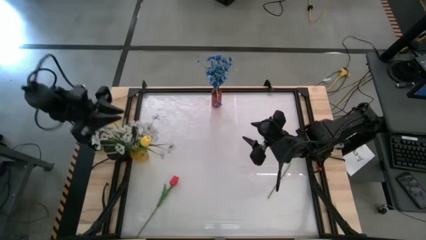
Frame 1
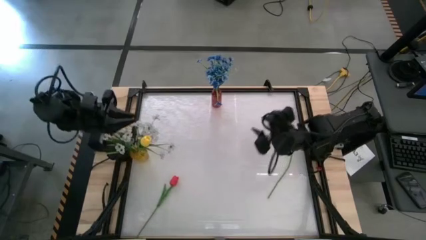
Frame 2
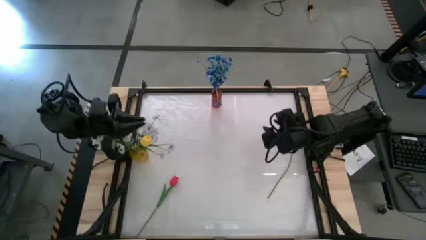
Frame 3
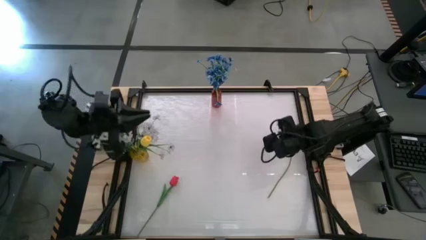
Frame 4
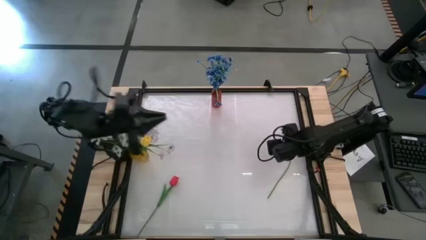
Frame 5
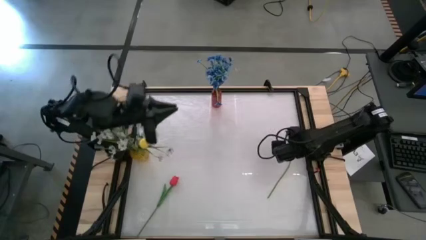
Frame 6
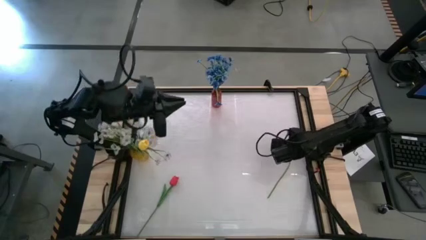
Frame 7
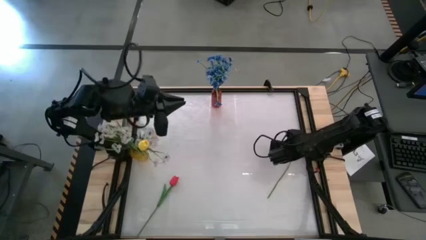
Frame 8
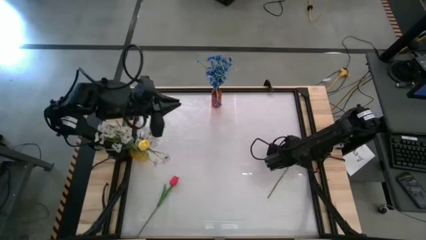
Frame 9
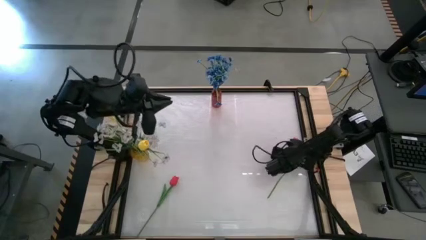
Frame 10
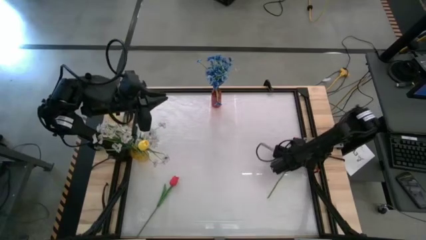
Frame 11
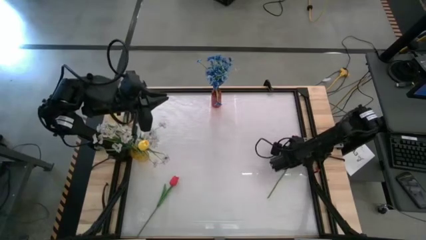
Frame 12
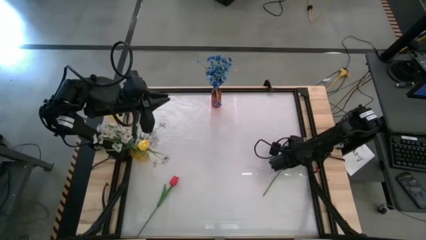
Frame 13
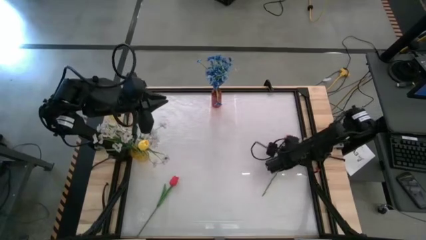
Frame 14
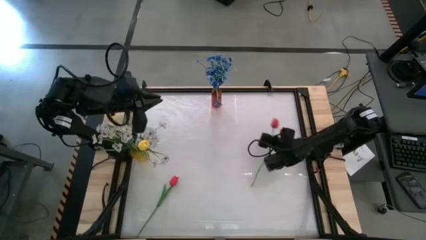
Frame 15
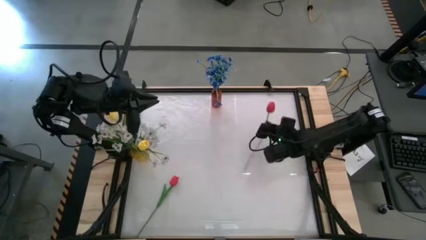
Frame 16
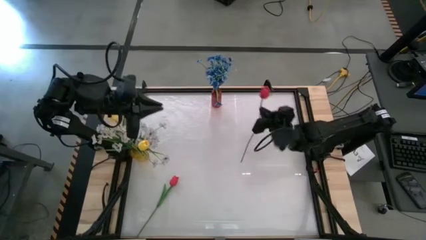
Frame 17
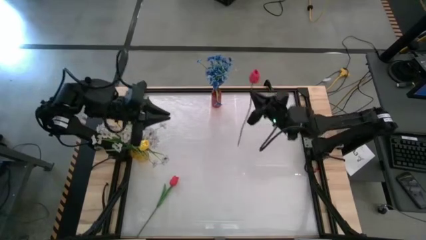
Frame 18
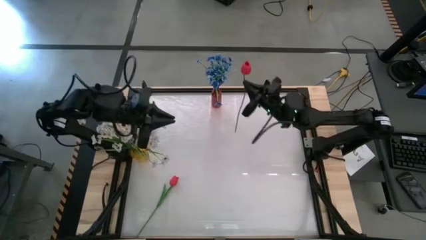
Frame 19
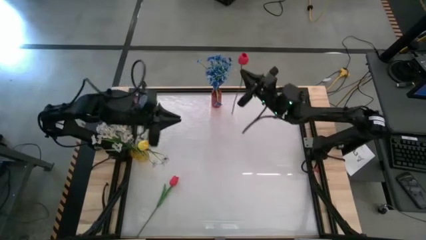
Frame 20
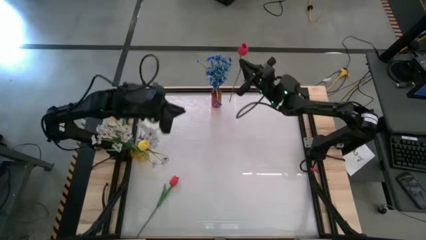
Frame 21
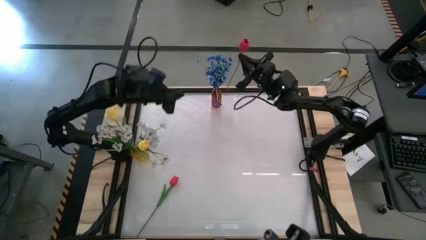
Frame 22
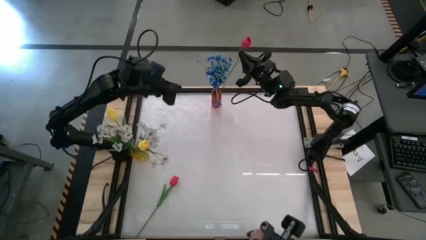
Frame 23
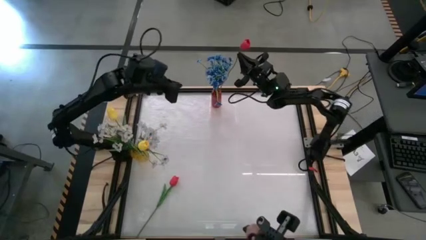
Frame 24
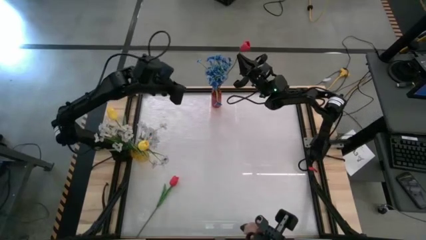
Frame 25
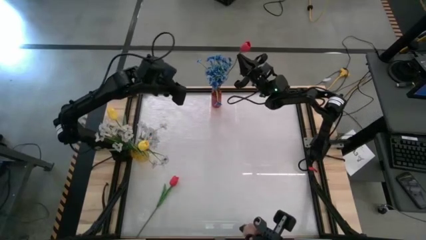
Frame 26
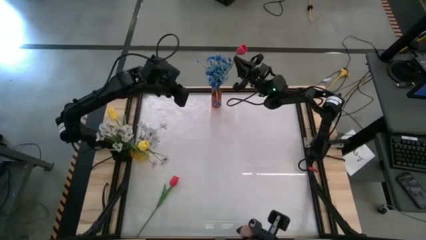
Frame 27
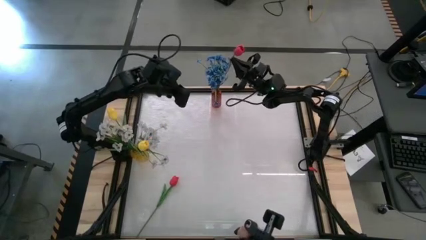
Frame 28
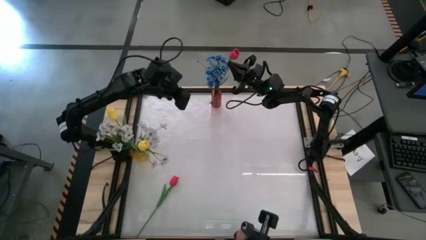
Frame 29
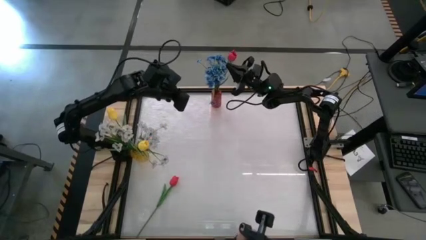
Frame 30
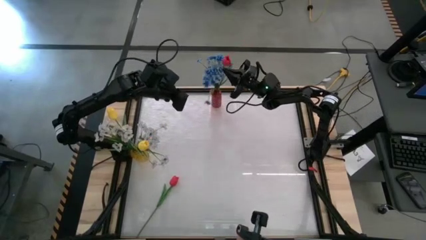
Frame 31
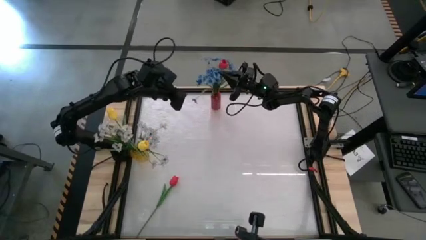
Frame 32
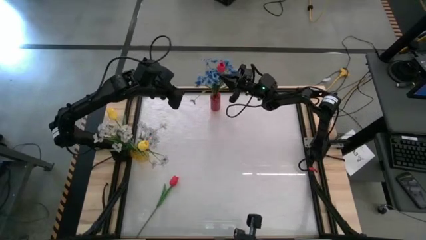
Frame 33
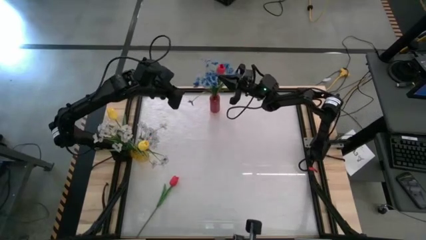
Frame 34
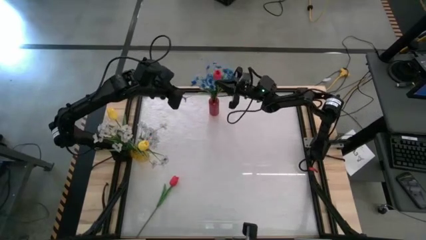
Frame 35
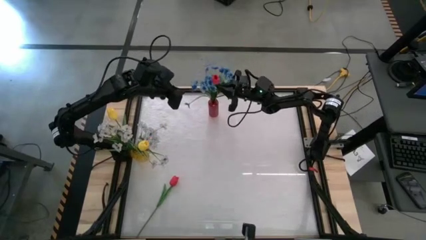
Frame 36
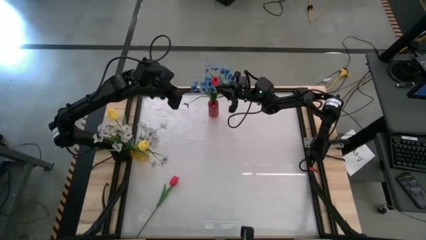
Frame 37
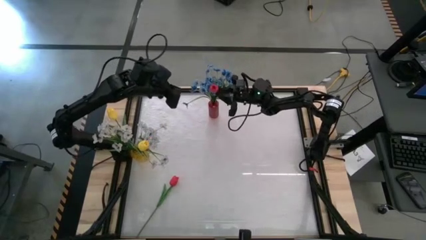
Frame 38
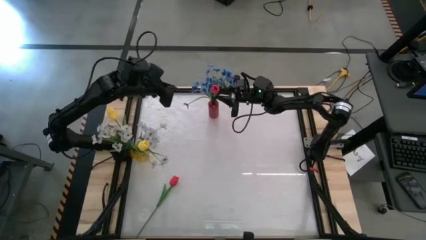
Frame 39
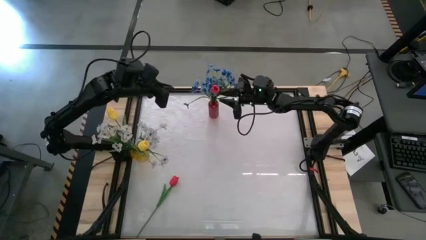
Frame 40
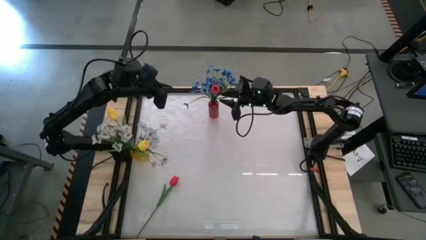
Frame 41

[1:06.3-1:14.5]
Task: Sort flowers into vase by color
Put the right red flower into the red flower vase

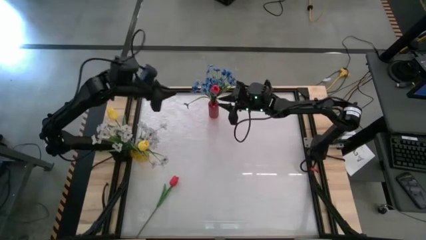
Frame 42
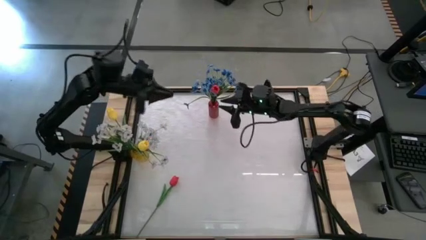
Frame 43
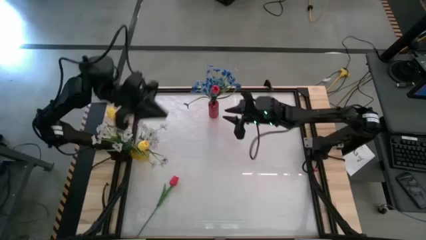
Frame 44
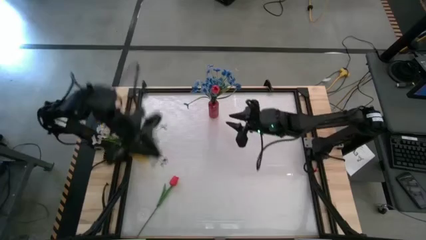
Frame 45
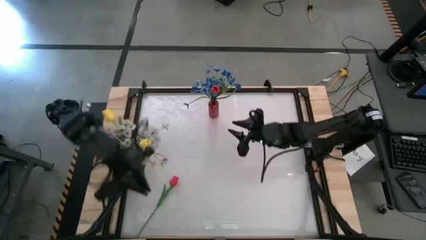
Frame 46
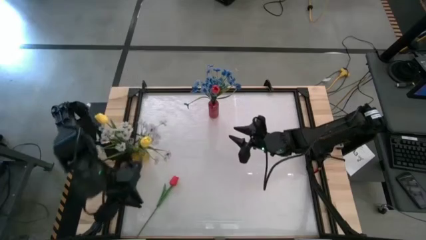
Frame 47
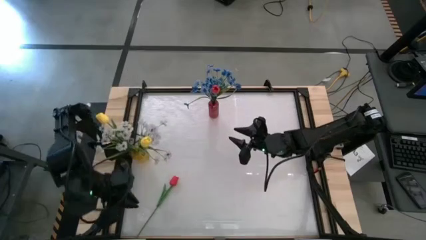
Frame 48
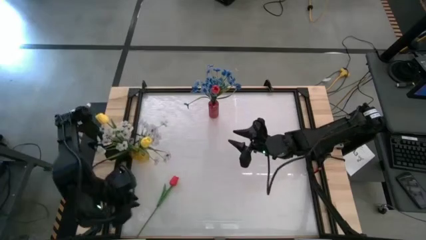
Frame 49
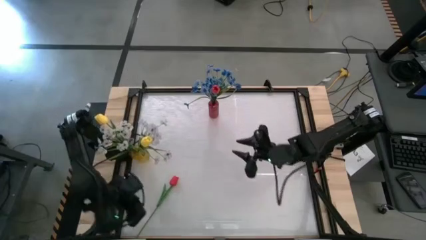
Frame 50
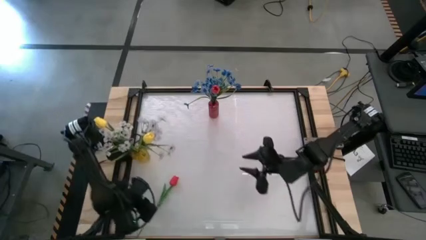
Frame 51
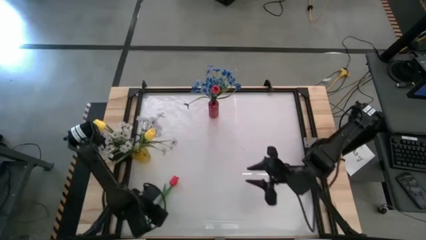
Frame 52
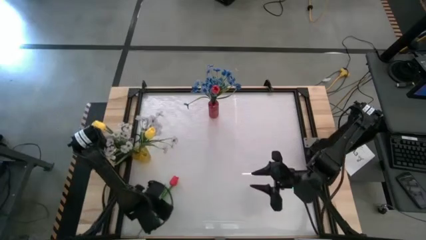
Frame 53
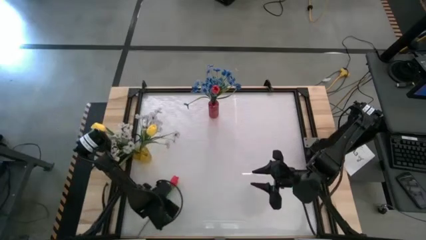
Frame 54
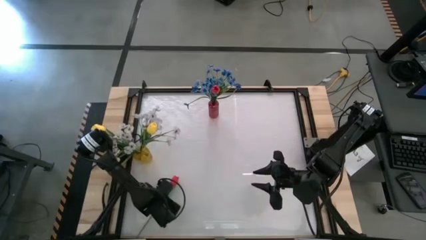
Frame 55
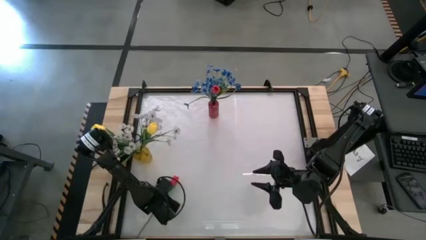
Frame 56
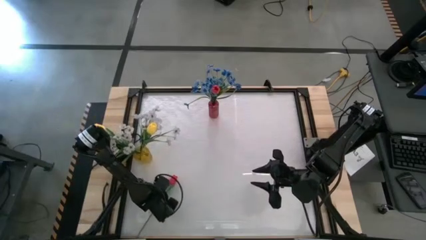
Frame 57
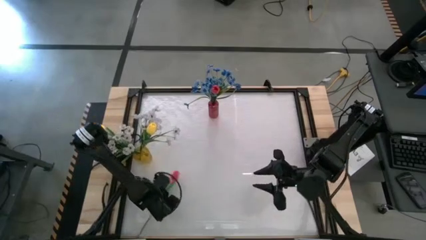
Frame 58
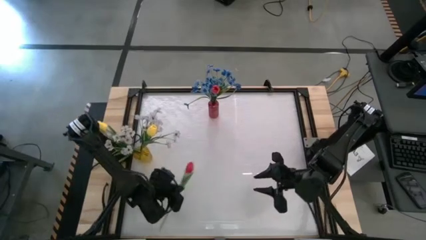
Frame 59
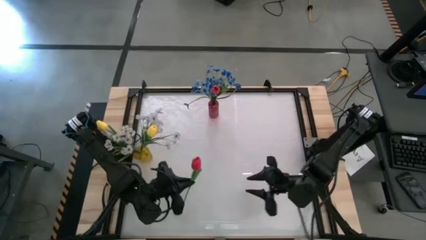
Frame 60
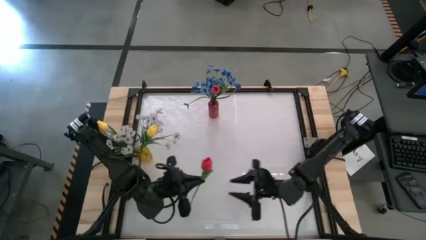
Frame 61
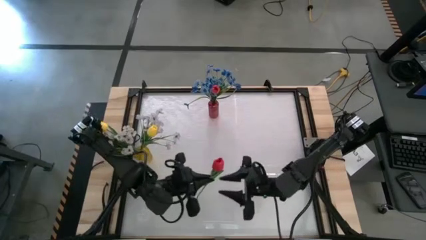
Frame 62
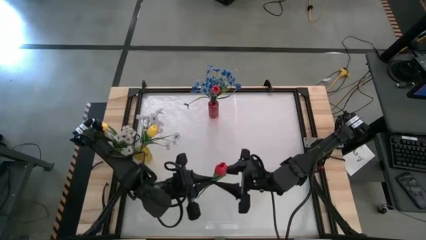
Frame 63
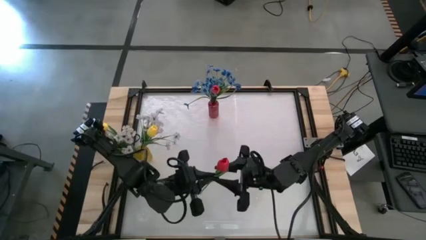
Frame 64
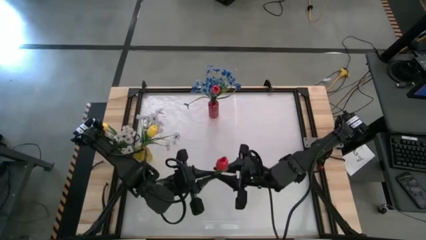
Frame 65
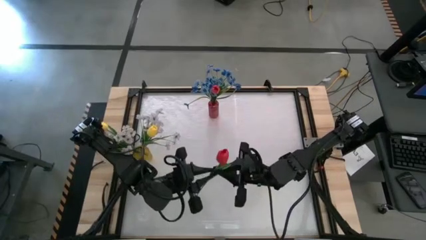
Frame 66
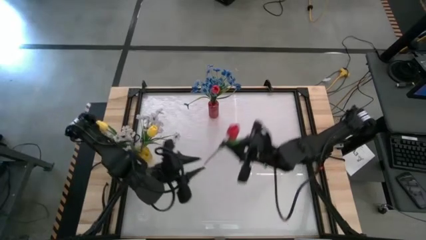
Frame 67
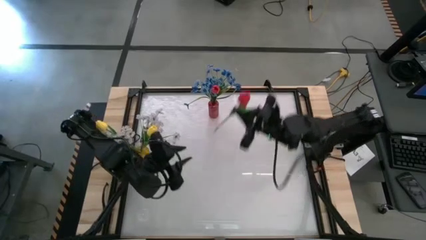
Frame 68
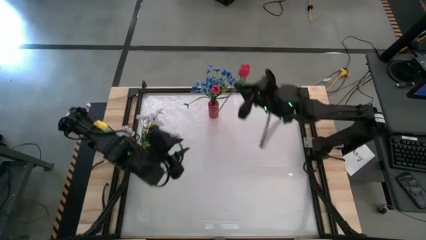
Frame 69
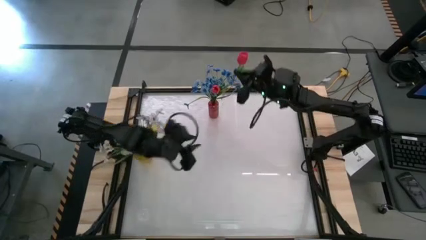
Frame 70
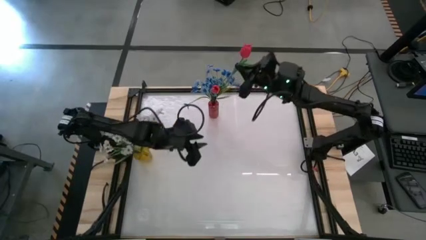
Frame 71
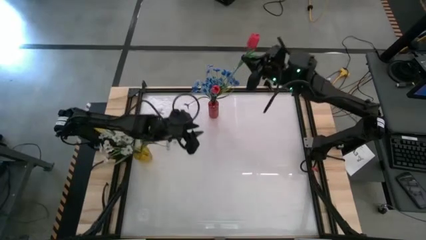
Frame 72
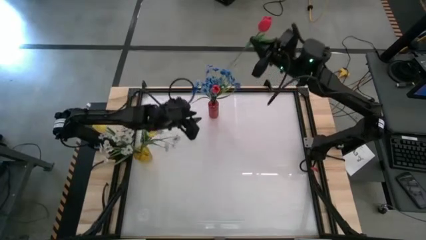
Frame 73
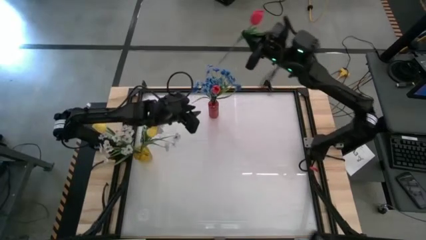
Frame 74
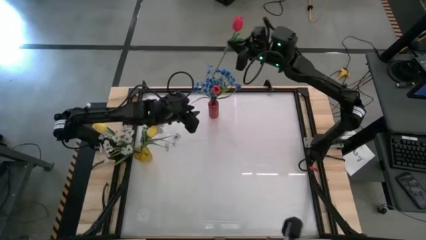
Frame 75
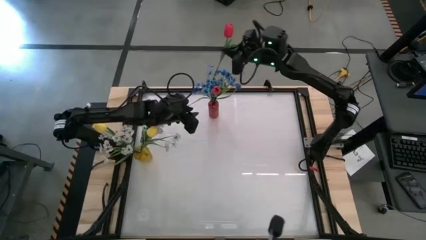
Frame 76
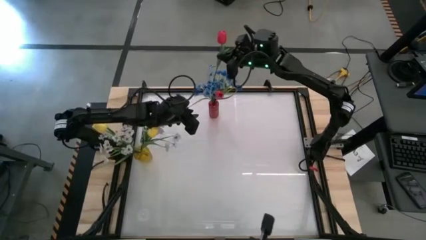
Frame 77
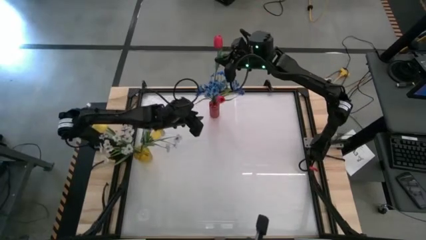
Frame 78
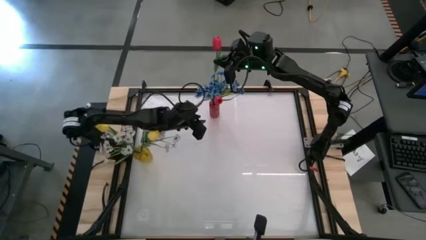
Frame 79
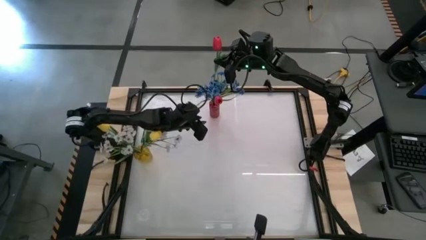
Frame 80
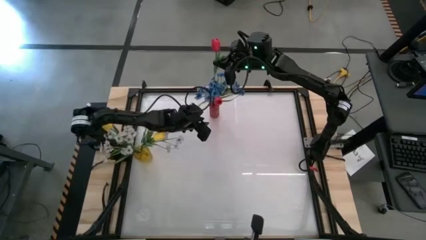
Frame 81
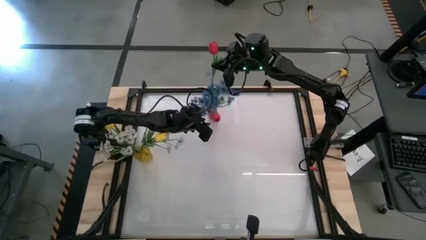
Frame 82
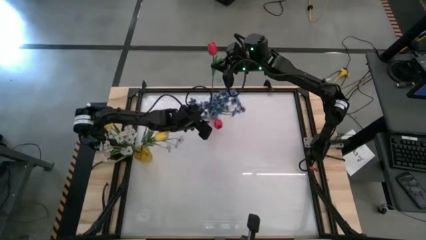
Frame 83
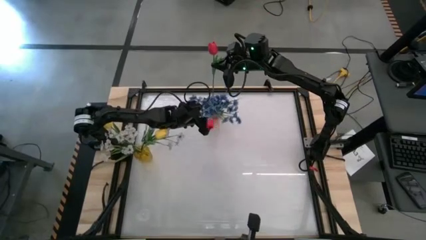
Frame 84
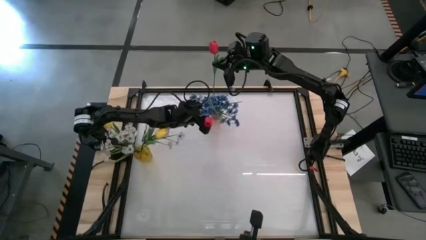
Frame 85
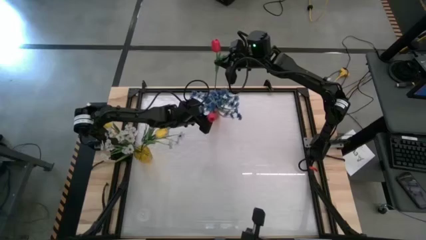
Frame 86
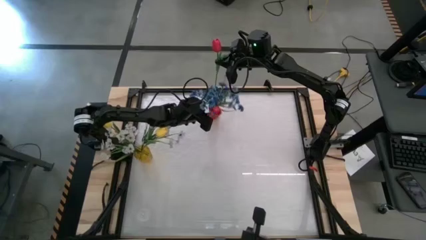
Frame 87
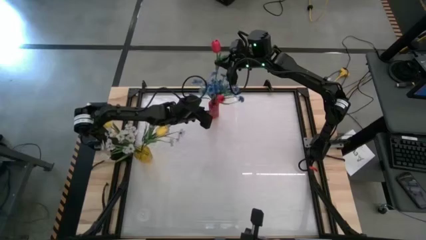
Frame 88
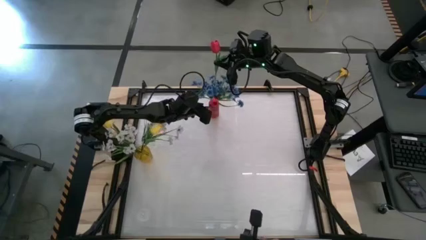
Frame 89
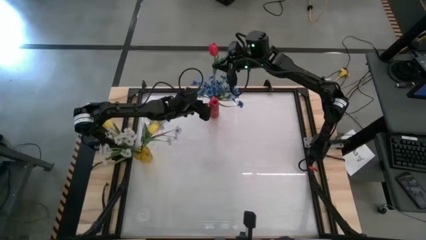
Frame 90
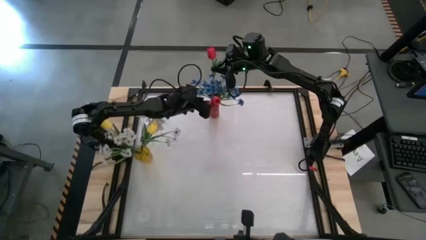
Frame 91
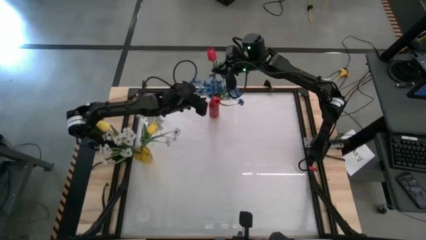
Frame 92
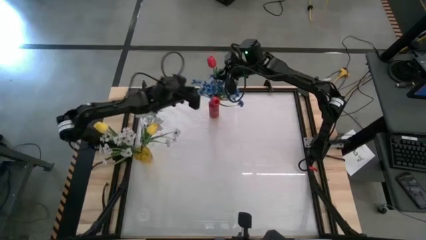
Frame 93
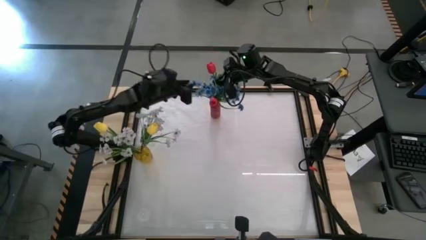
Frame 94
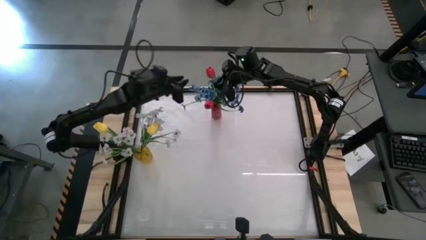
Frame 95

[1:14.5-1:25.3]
Put the red flower into the red flower vase
